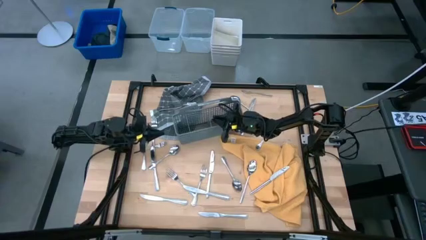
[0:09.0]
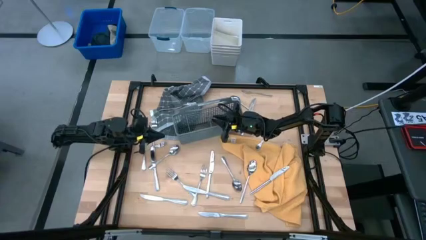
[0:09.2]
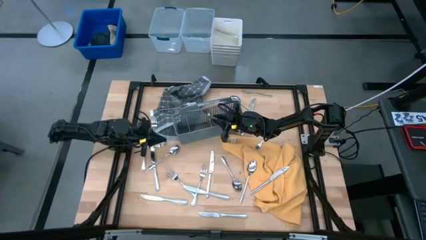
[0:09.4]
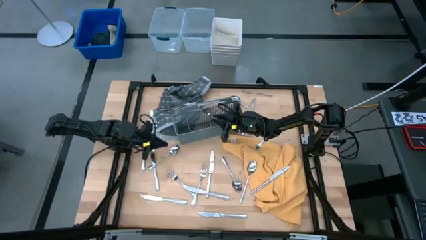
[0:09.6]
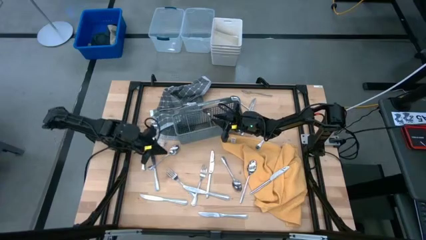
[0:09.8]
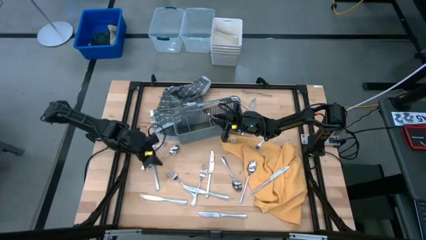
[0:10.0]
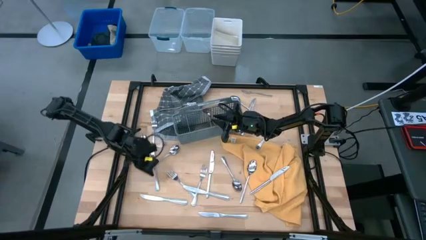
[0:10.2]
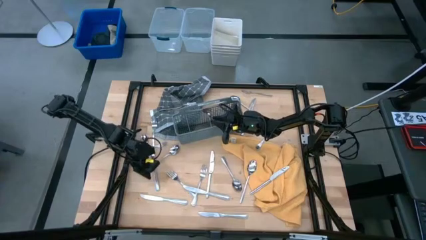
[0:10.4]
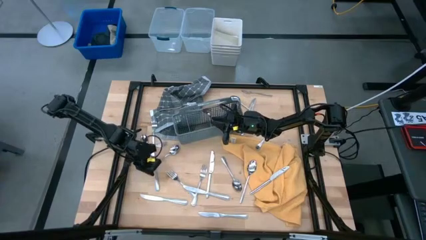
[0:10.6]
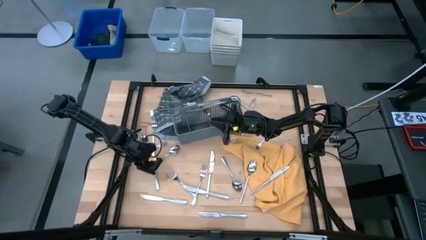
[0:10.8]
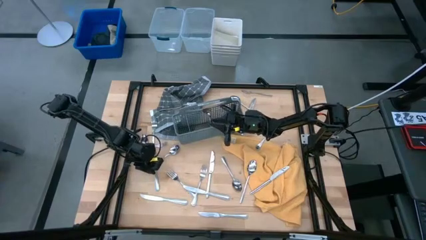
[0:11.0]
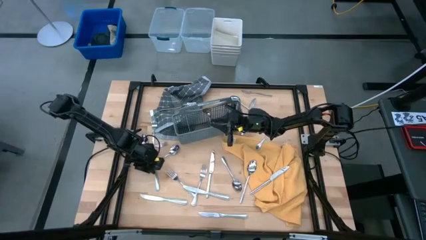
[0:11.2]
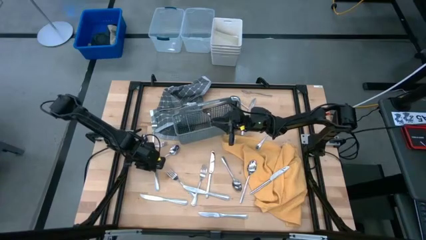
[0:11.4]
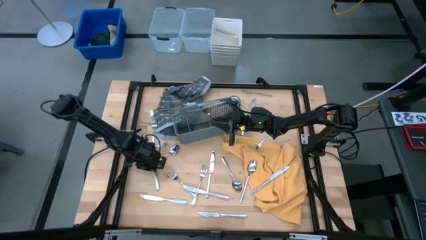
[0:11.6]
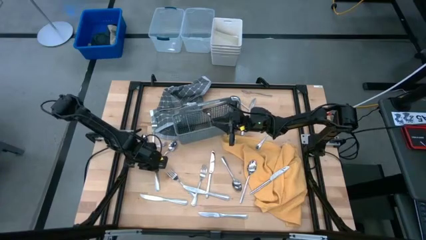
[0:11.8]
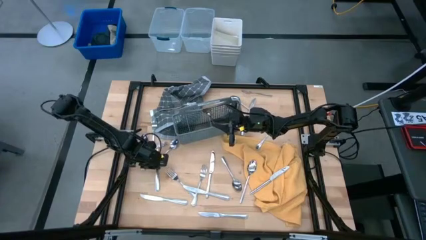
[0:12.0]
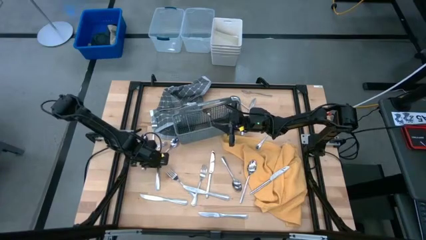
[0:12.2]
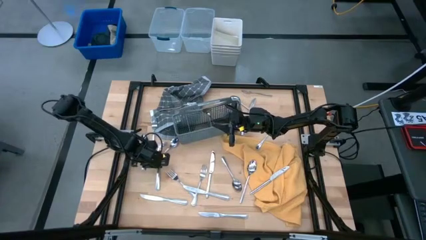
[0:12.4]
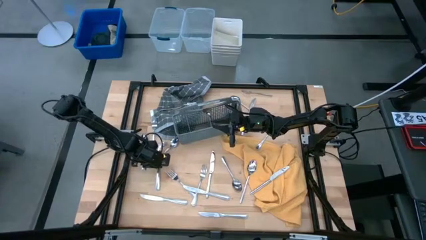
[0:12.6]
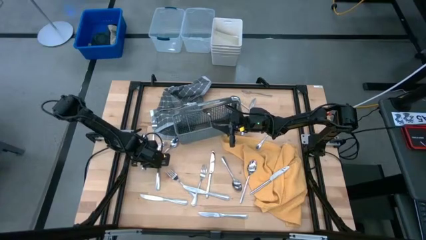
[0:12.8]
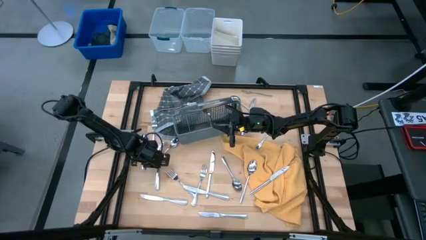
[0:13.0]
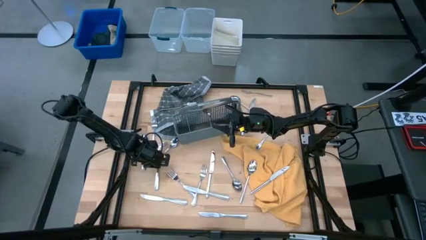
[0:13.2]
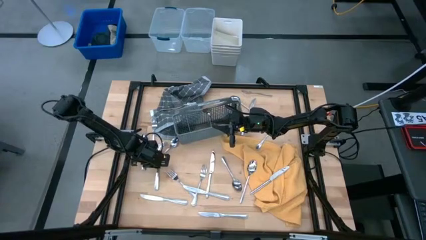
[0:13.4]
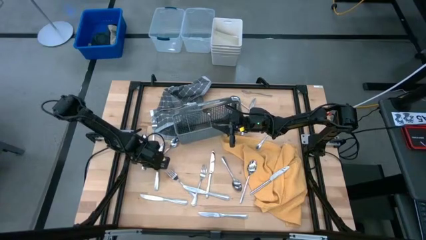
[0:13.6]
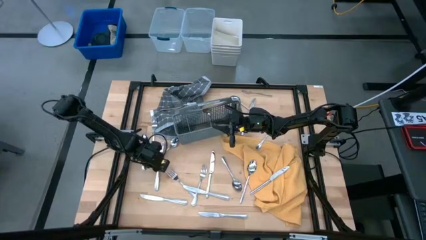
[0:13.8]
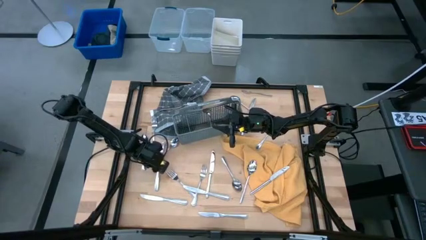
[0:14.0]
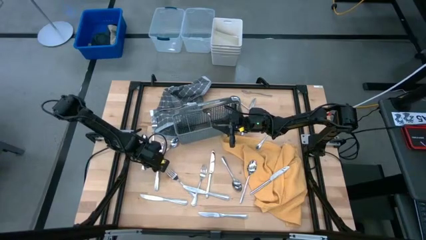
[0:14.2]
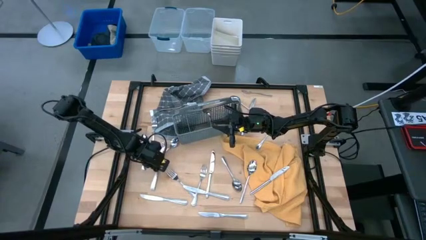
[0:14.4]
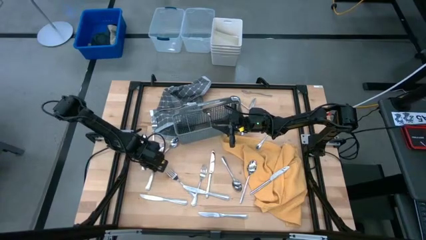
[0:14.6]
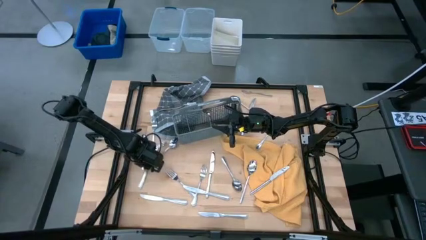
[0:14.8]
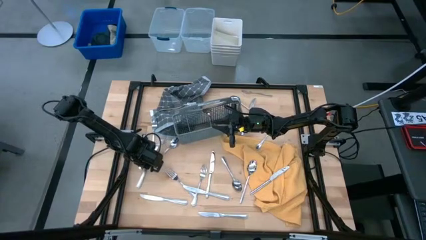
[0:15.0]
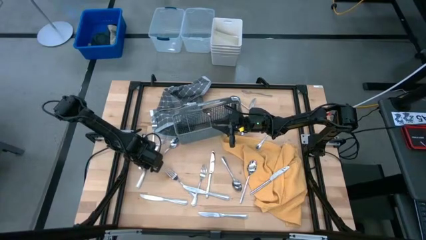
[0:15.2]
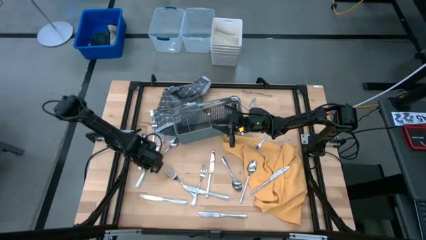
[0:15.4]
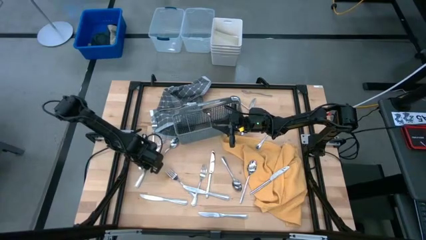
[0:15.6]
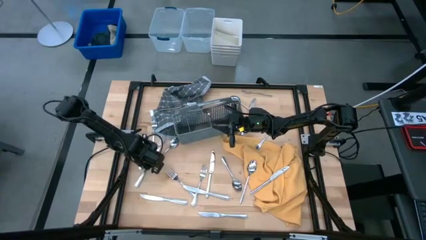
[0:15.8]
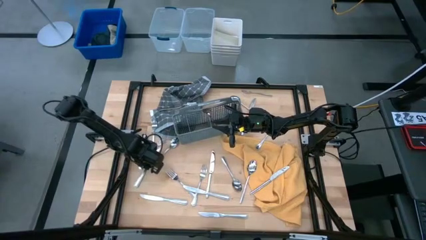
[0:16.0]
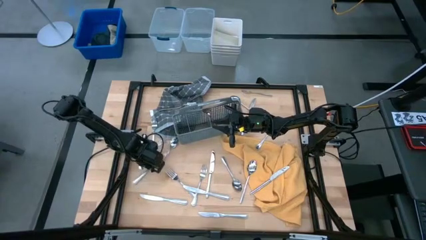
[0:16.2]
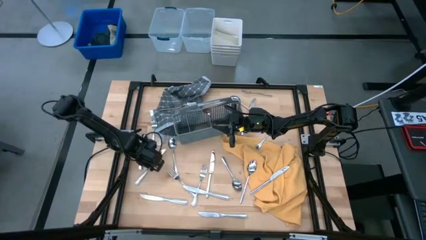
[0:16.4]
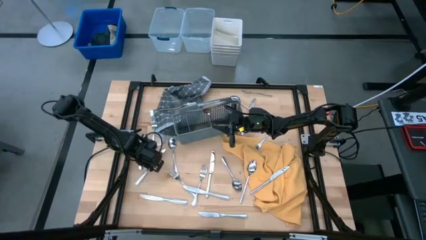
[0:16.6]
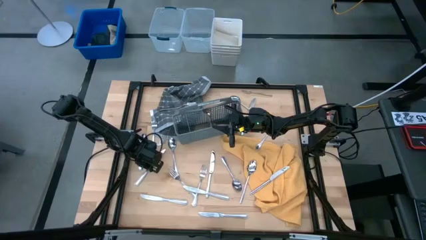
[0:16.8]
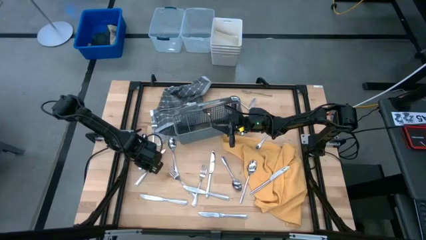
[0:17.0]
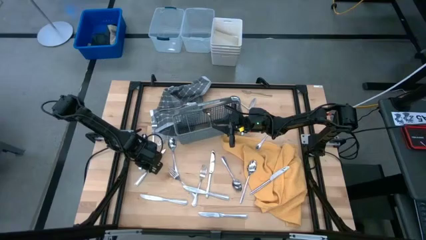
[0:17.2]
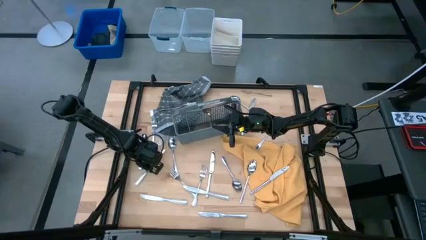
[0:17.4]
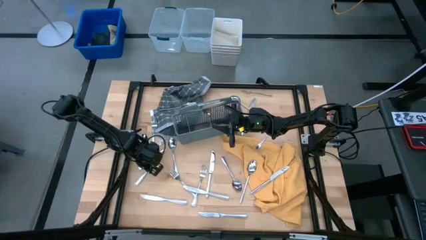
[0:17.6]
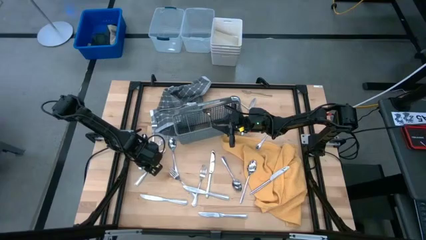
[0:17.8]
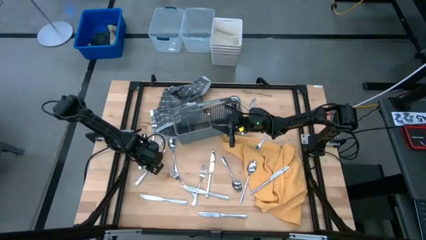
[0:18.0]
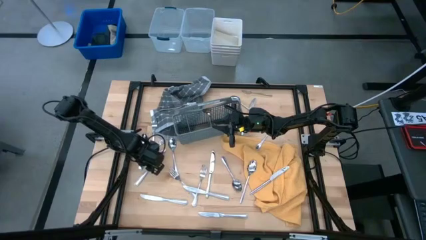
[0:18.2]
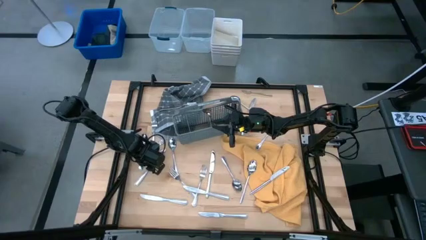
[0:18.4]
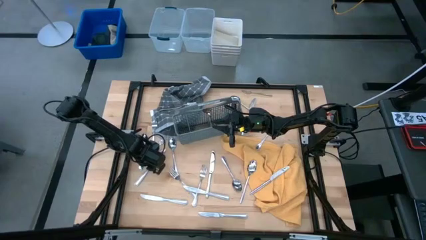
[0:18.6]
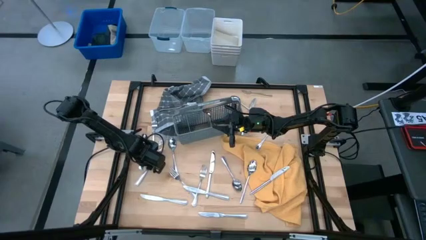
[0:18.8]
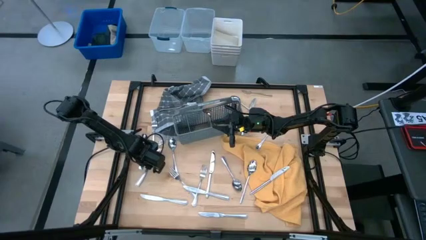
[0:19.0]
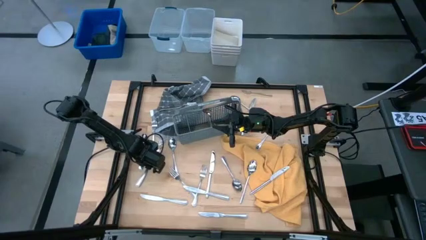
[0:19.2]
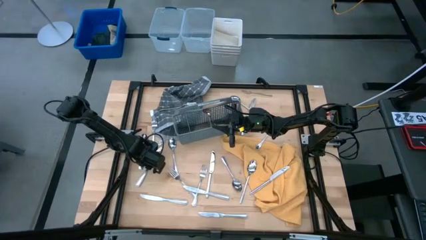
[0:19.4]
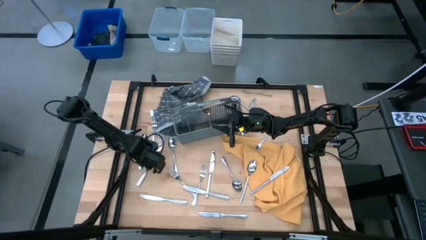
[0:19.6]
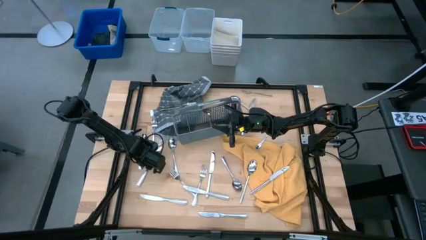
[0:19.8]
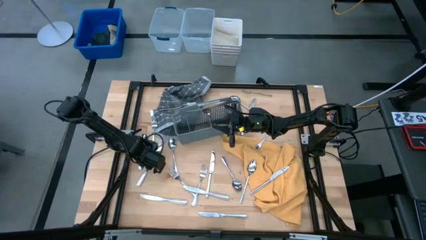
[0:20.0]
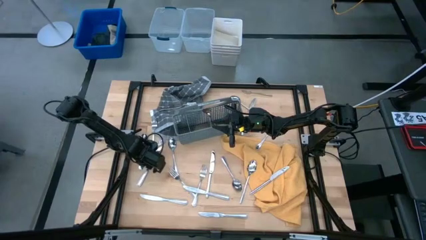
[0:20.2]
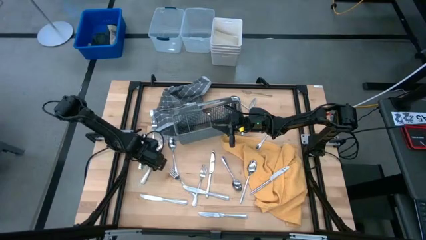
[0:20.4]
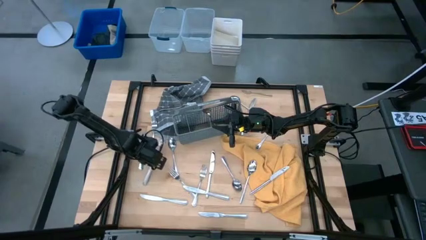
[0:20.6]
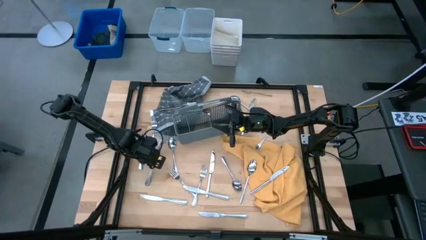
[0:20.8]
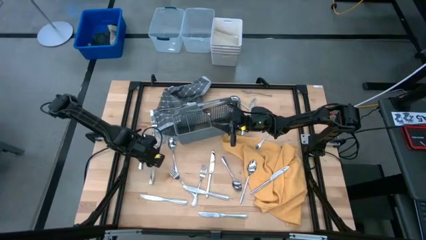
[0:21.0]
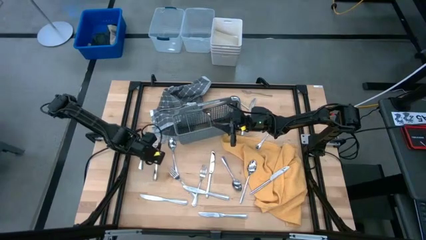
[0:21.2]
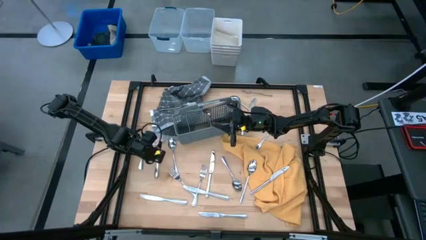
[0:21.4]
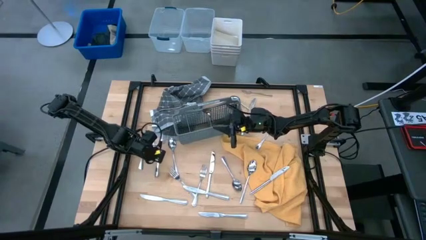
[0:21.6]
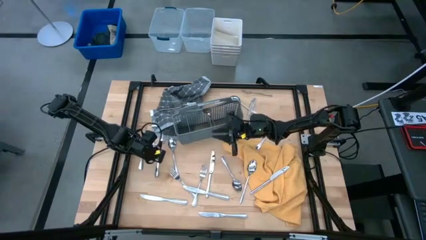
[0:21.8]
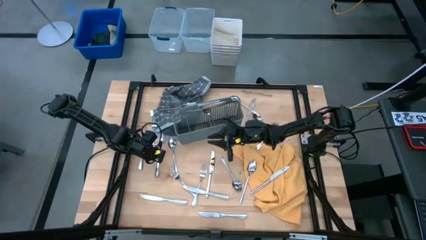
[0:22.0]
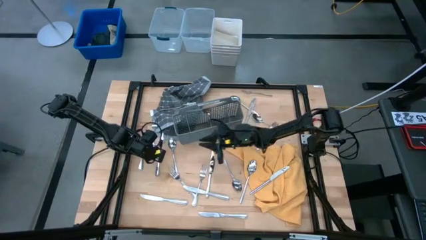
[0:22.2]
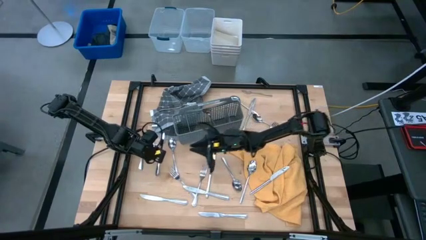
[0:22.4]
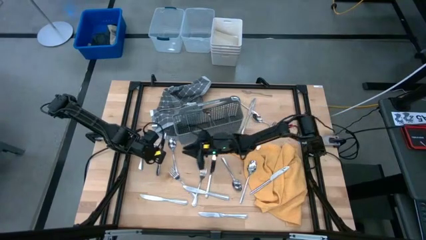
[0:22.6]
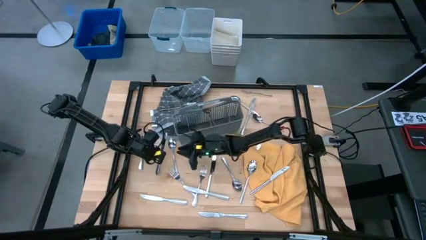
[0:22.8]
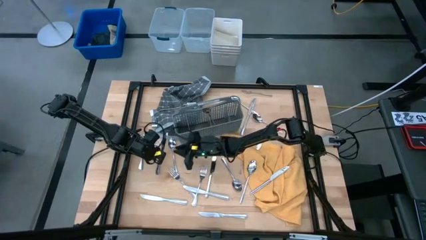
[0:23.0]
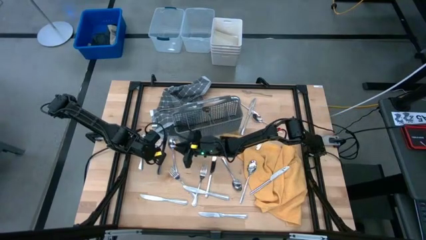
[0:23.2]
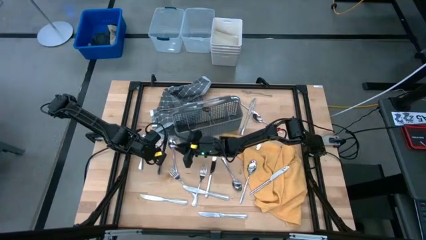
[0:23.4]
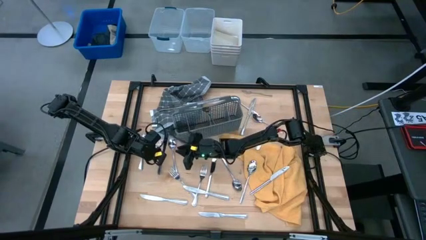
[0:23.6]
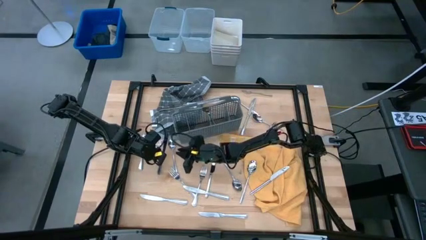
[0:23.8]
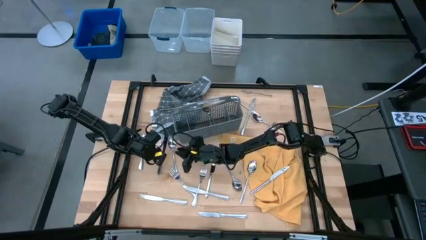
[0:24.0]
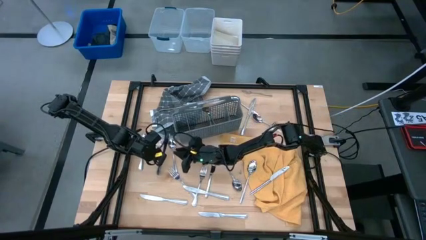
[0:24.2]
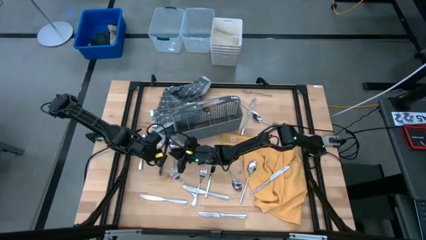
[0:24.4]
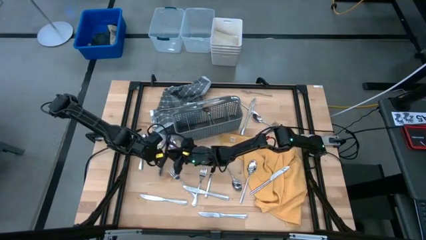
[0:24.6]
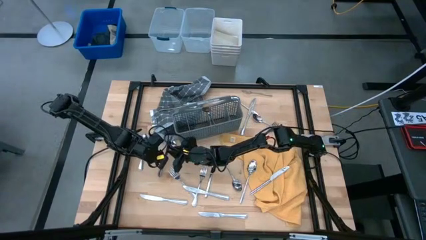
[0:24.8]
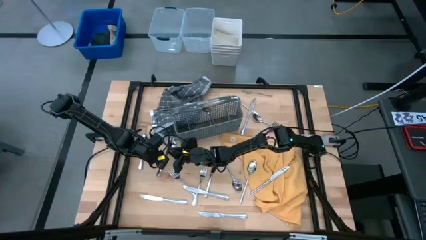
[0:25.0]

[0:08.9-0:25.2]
Task: Sort silverware
Put the silver knife into the gray silverware basket
